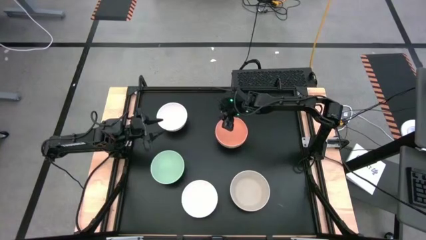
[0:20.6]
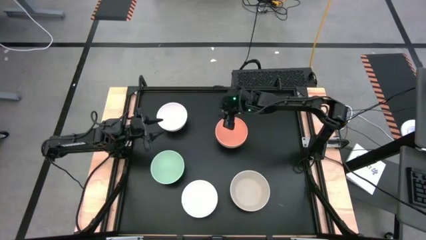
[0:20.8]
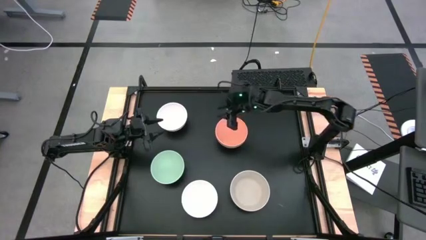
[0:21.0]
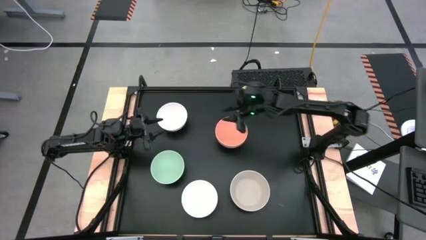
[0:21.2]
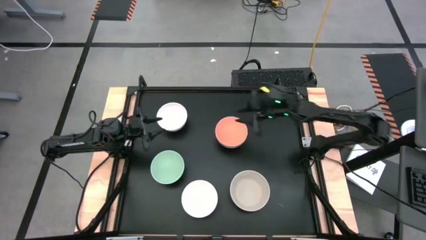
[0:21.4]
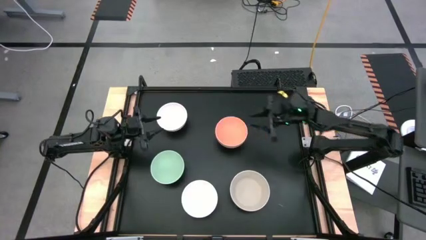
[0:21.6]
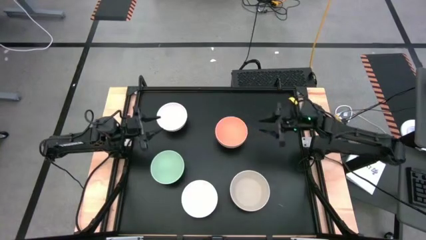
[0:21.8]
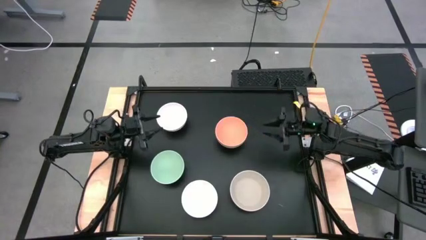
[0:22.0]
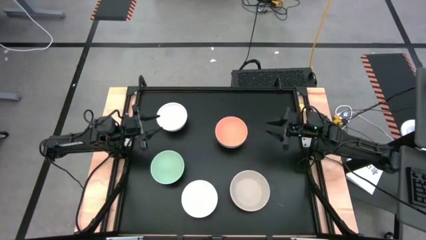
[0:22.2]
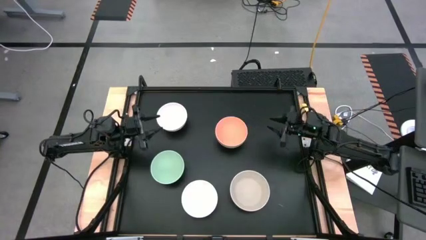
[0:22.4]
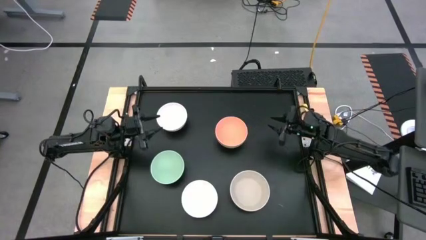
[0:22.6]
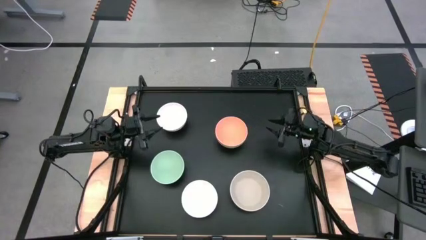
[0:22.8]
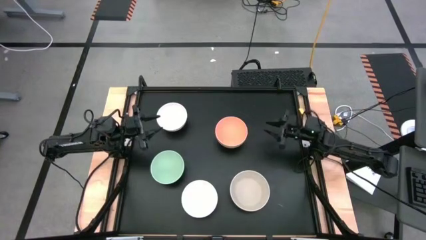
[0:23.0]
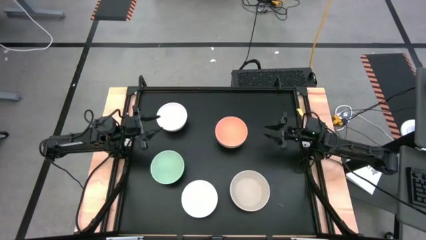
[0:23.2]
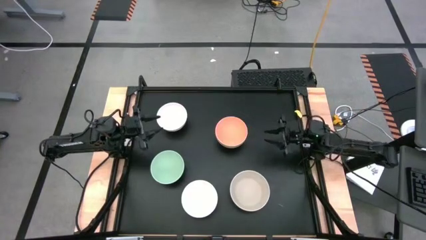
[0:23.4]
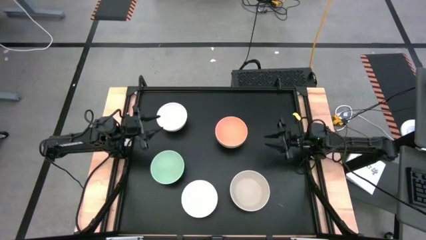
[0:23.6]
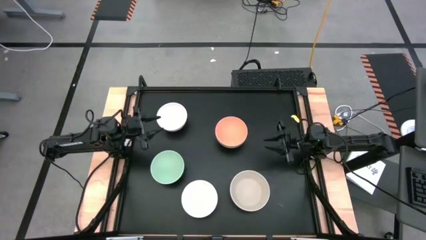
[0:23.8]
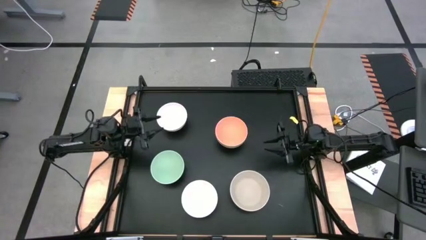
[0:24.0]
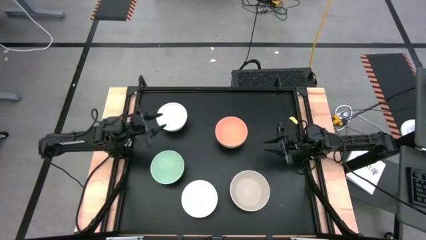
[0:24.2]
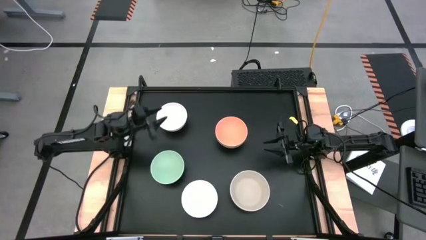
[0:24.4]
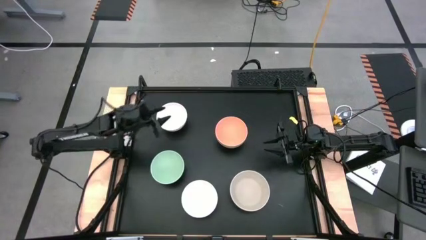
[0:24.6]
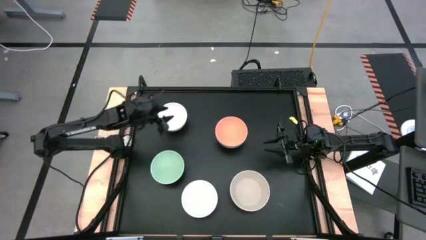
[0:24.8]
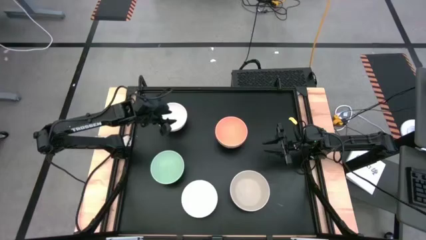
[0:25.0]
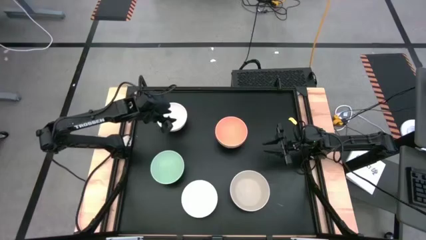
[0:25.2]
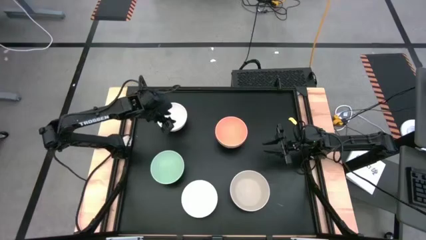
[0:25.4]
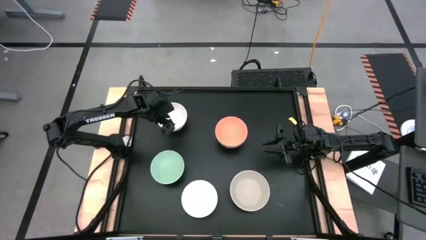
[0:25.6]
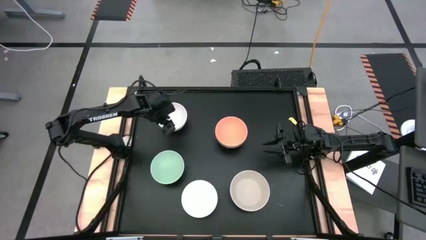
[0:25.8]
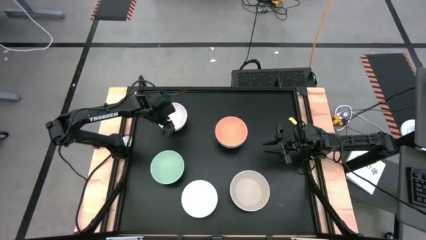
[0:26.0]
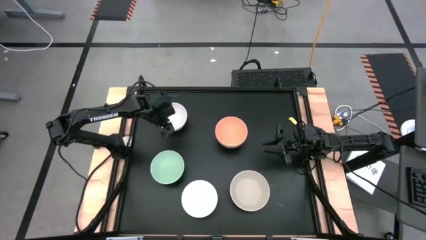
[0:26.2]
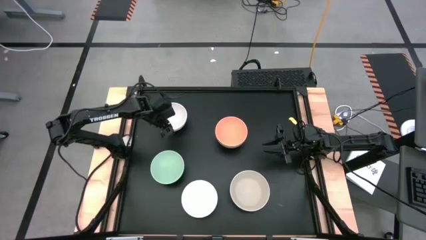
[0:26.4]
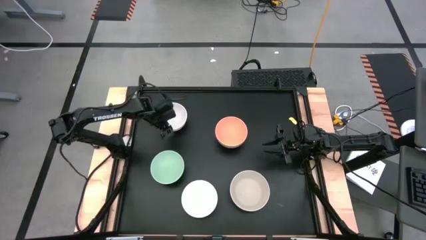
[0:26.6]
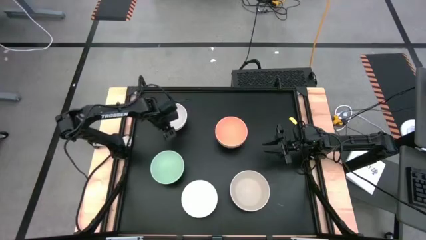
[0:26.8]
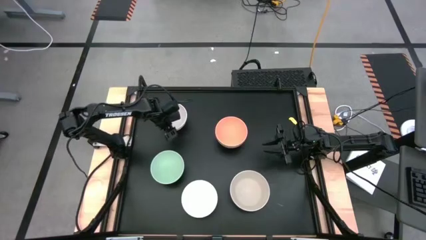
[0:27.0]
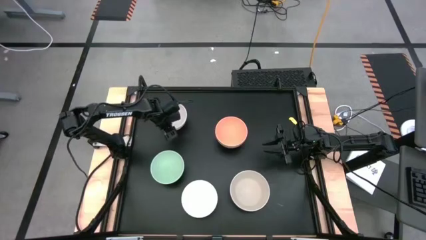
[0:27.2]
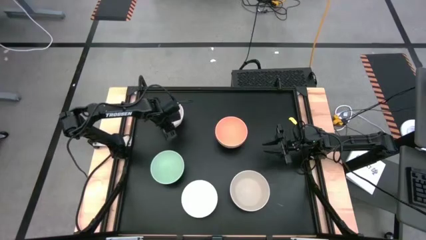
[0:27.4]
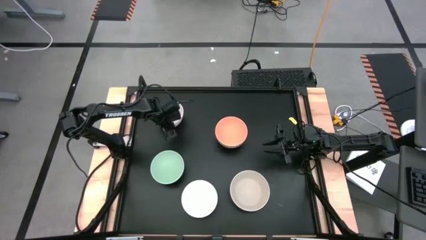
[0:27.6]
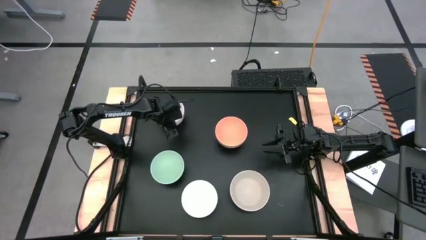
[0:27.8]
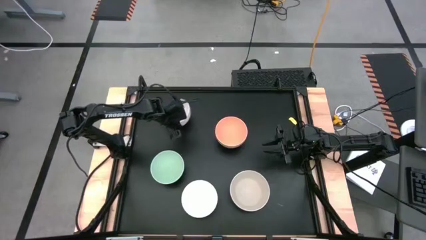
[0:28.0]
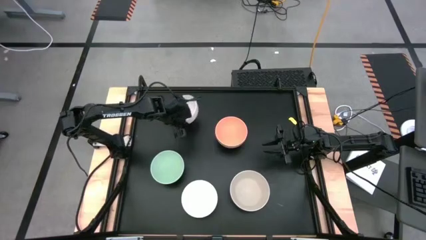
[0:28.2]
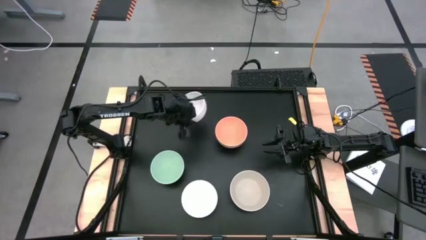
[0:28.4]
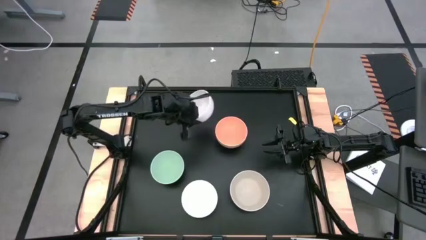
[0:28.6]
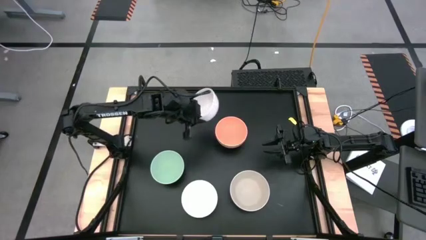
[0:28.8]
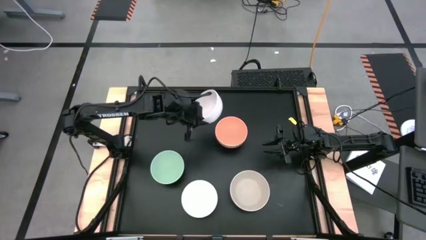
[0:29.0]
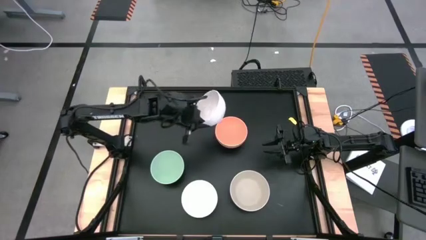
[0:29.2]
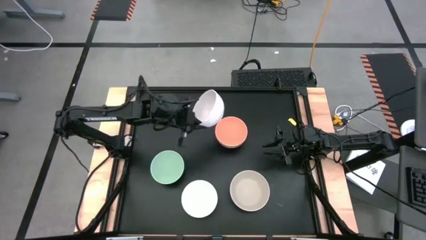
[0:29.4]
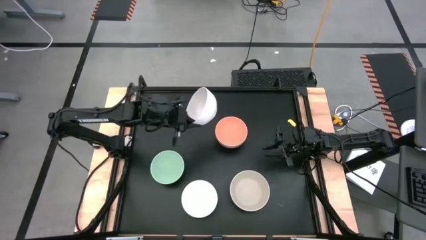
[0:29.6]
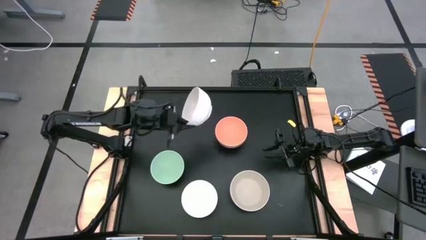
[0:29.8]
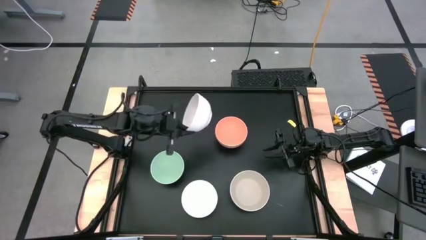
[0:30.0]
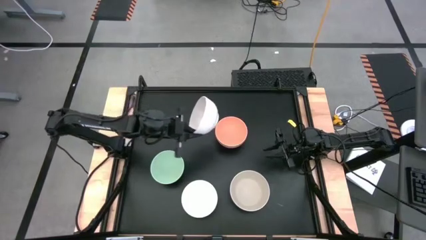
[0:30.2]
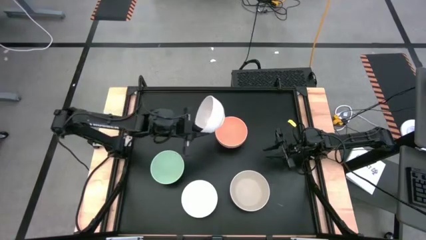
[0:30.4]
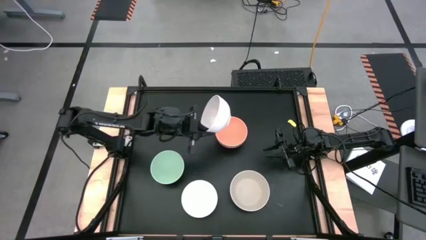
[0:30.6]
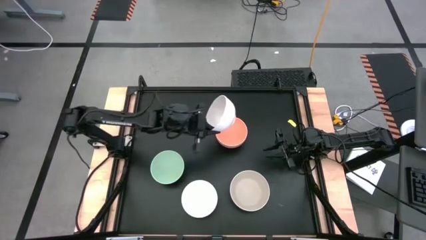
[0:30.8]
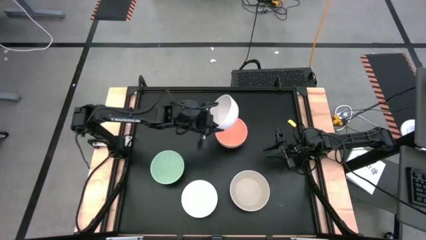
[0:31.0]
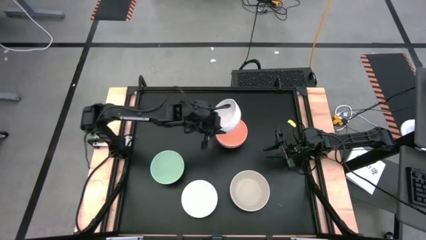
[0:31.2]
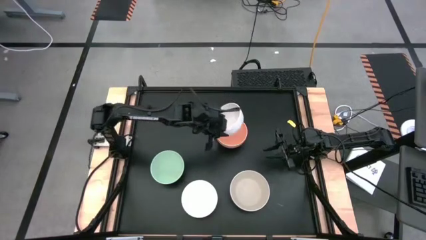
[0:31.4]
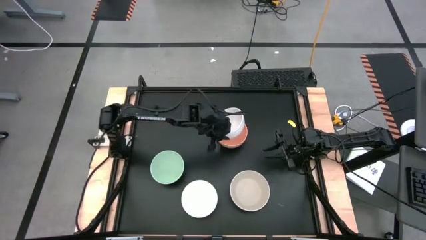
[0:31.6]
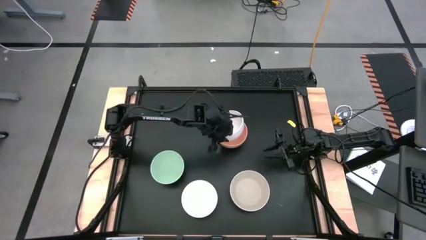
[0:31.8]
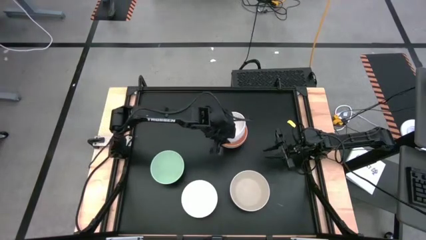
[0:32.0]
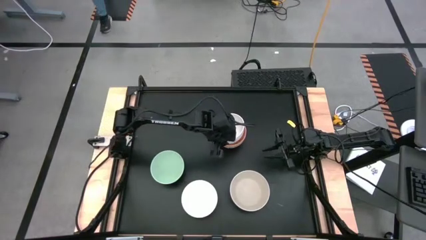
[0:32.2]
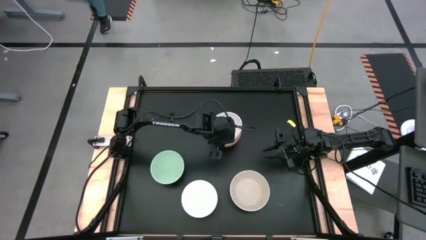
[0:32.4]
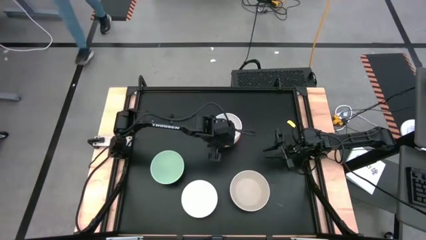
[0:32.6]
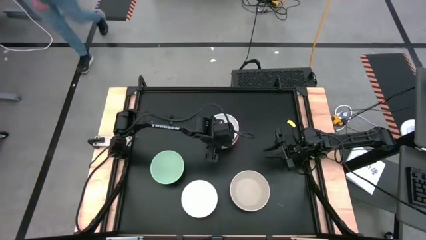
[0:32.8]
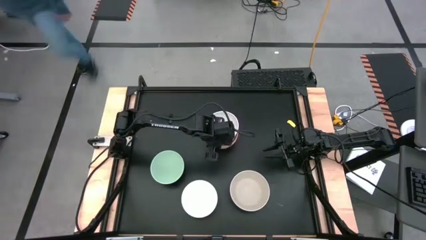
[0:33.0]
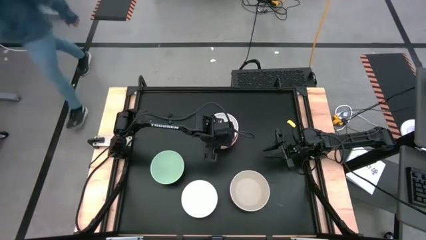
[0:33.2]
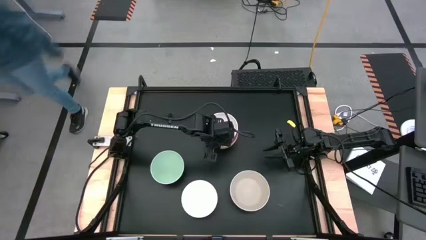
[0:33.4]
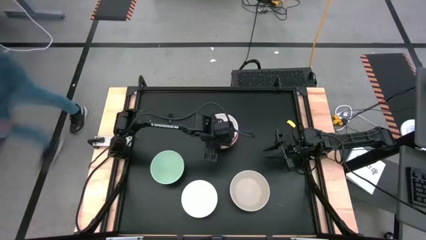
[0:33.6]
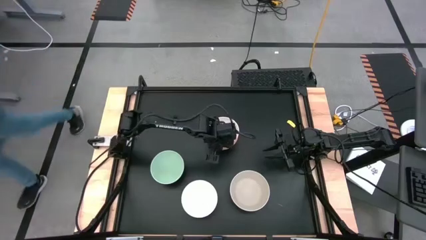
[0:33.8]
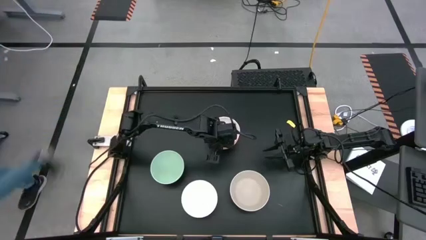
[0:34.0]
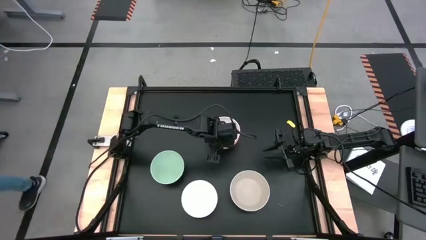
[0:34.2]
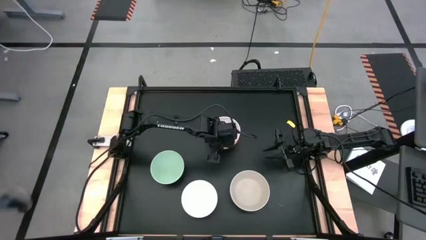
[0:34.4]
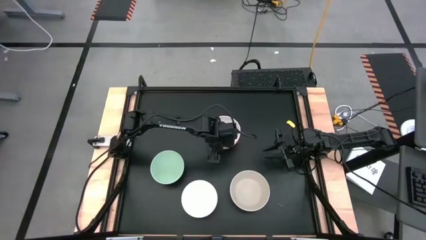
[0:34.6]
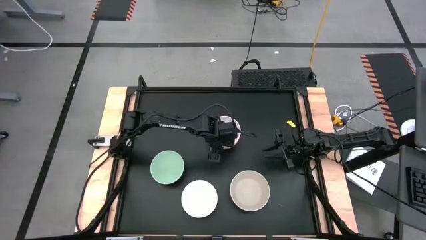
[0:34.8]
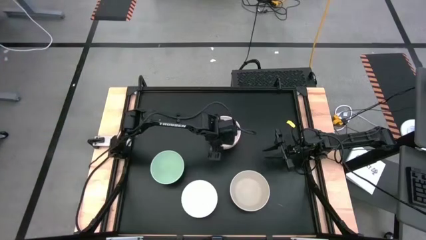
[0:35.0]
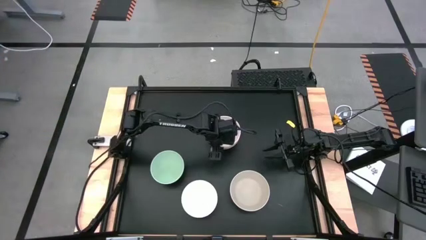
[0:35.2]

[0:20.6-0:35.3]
Task: Nest bowls inside each other
Stack the top left white bowl on top of the light orange bowl
